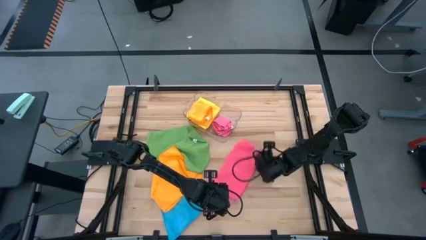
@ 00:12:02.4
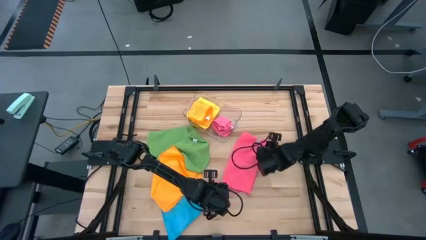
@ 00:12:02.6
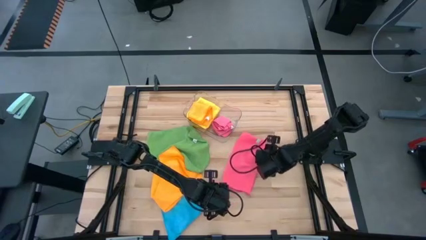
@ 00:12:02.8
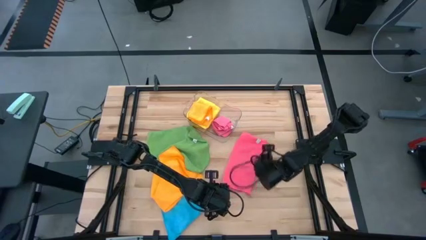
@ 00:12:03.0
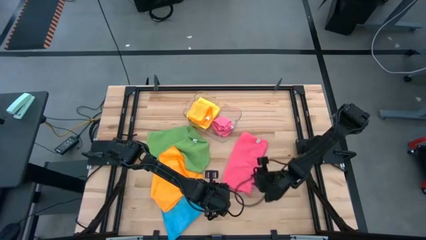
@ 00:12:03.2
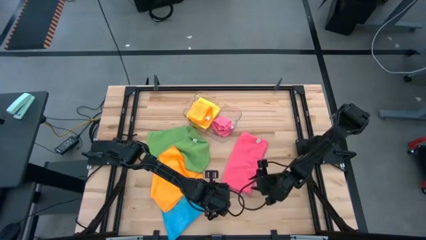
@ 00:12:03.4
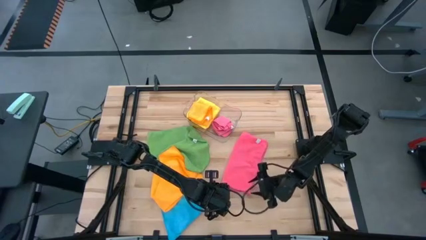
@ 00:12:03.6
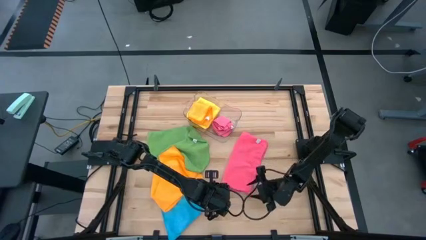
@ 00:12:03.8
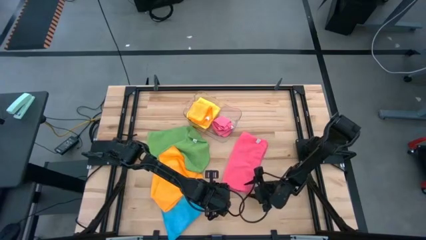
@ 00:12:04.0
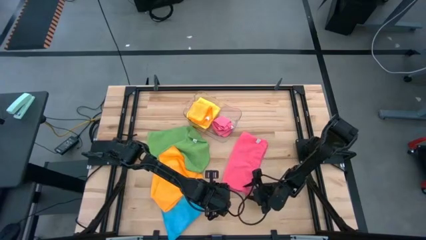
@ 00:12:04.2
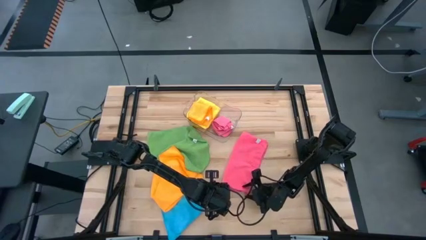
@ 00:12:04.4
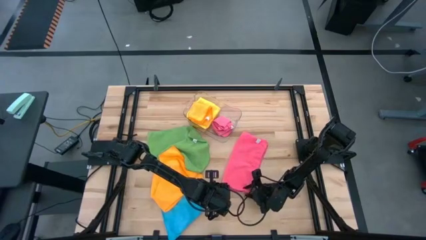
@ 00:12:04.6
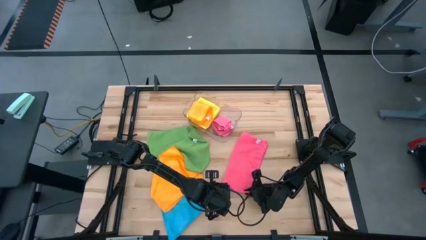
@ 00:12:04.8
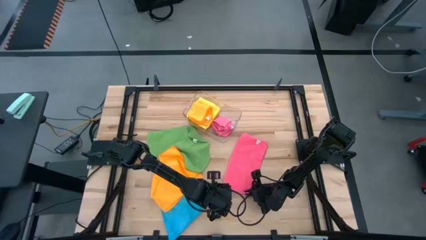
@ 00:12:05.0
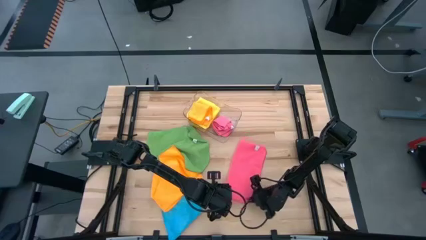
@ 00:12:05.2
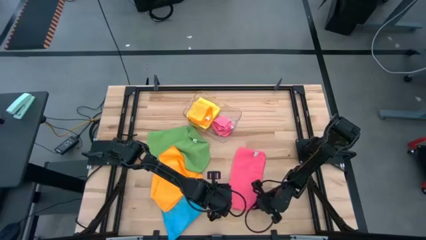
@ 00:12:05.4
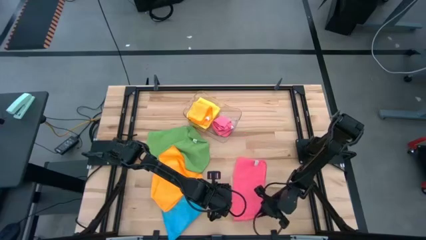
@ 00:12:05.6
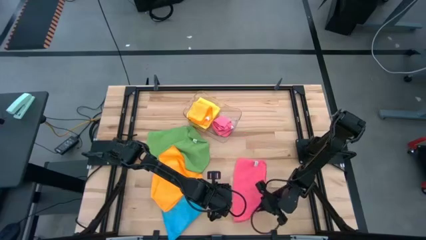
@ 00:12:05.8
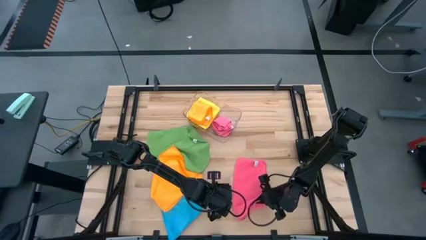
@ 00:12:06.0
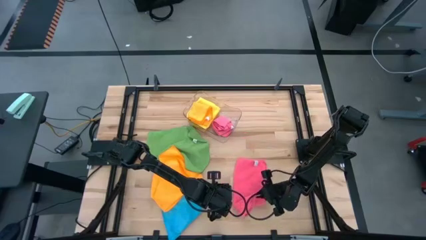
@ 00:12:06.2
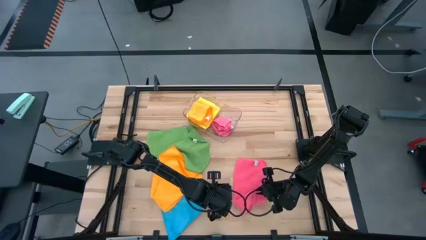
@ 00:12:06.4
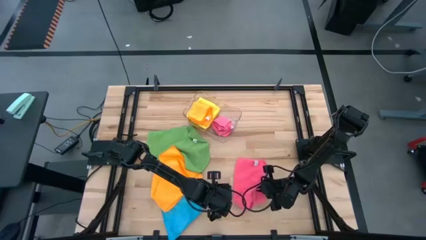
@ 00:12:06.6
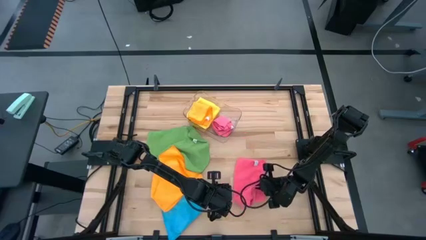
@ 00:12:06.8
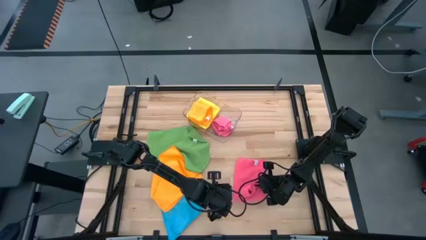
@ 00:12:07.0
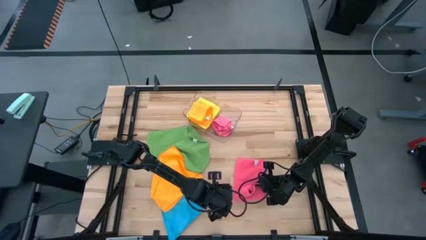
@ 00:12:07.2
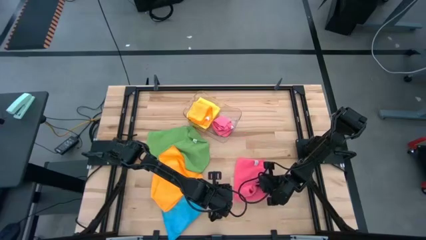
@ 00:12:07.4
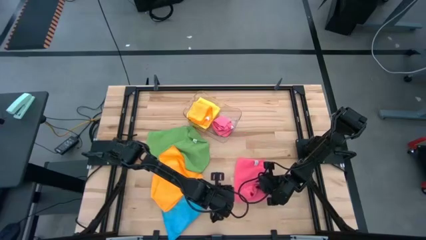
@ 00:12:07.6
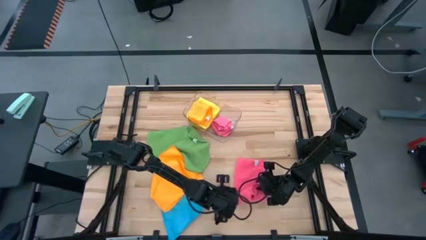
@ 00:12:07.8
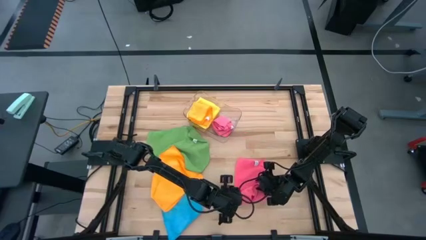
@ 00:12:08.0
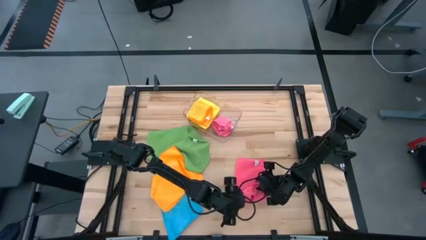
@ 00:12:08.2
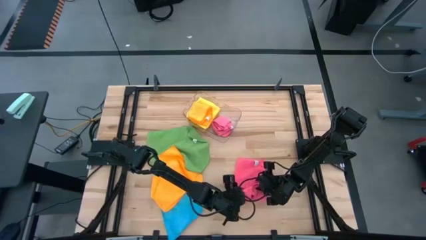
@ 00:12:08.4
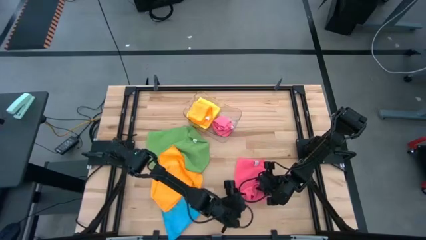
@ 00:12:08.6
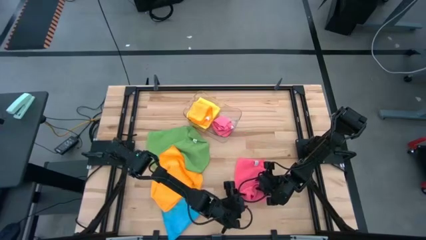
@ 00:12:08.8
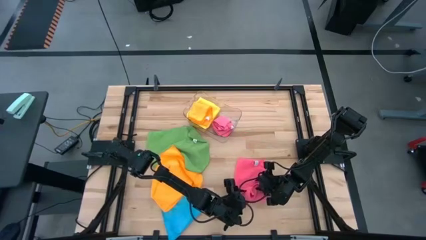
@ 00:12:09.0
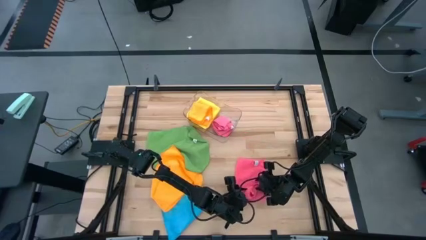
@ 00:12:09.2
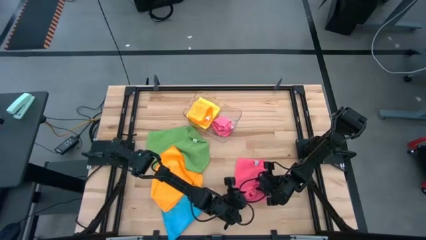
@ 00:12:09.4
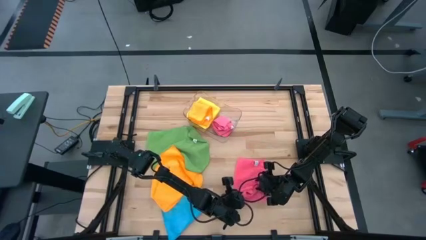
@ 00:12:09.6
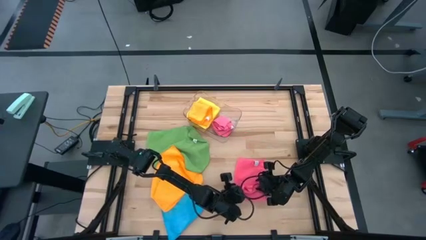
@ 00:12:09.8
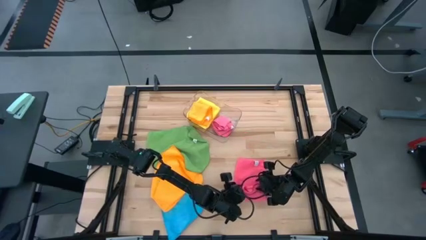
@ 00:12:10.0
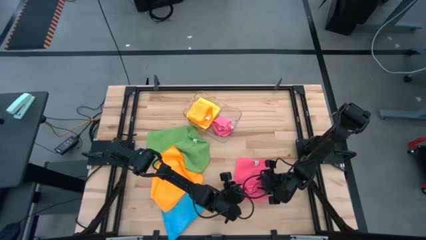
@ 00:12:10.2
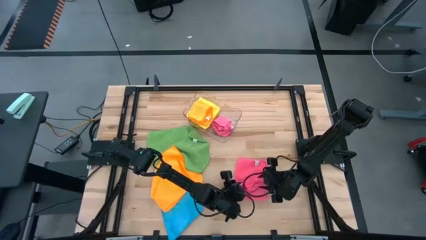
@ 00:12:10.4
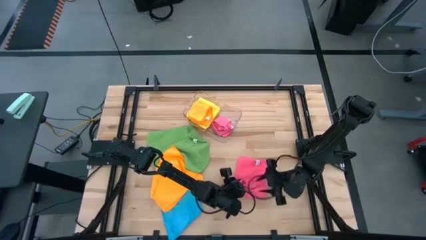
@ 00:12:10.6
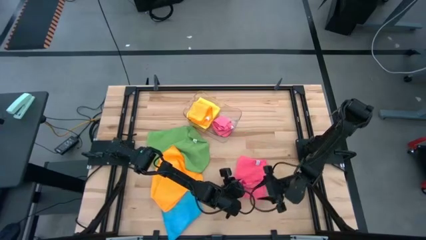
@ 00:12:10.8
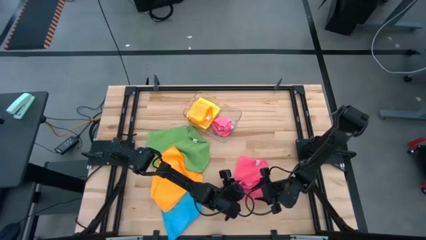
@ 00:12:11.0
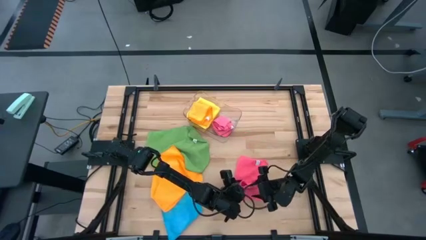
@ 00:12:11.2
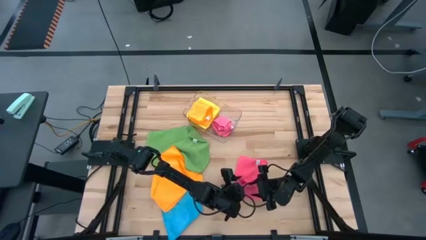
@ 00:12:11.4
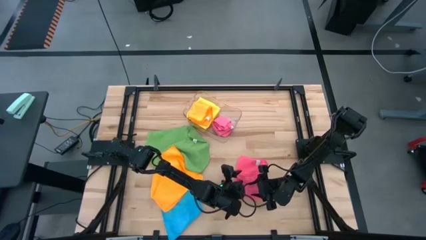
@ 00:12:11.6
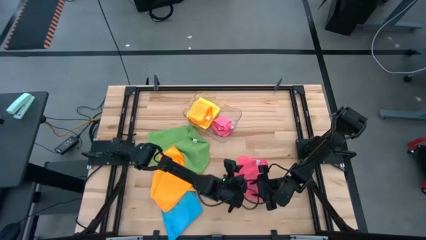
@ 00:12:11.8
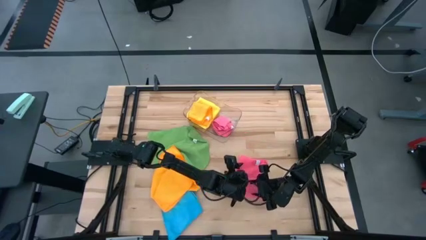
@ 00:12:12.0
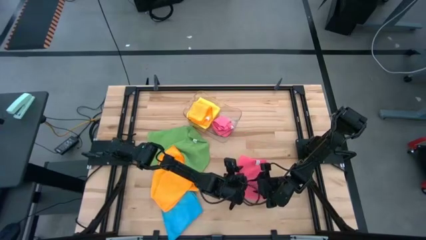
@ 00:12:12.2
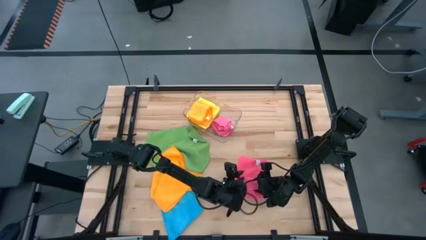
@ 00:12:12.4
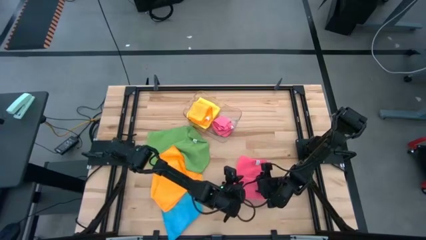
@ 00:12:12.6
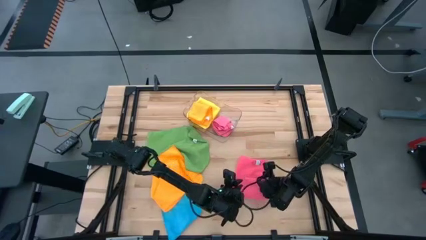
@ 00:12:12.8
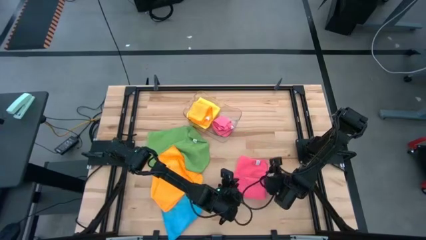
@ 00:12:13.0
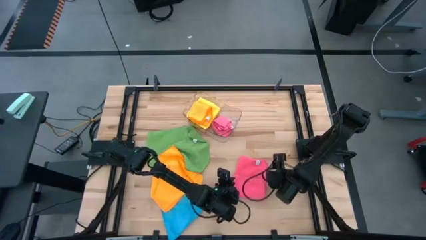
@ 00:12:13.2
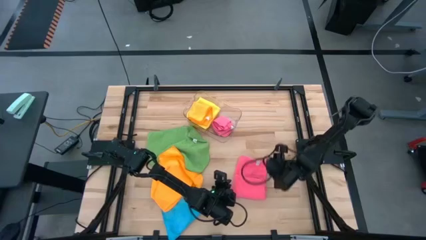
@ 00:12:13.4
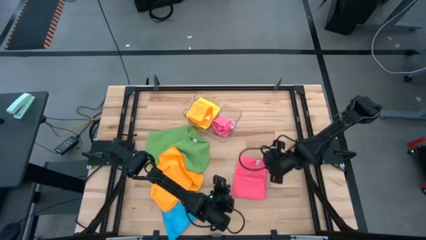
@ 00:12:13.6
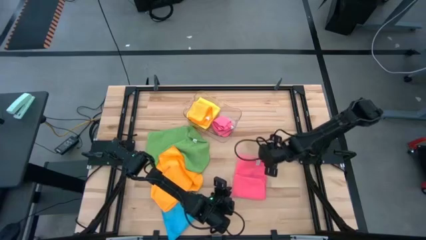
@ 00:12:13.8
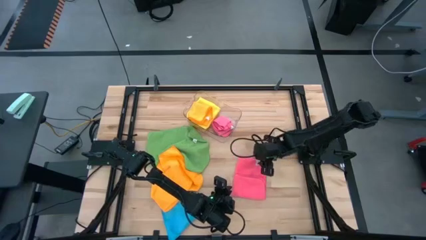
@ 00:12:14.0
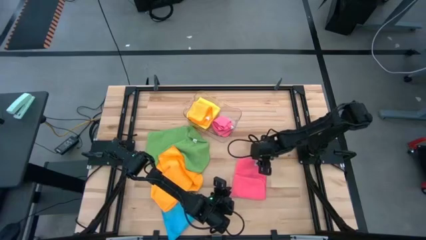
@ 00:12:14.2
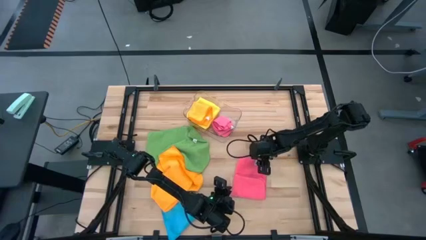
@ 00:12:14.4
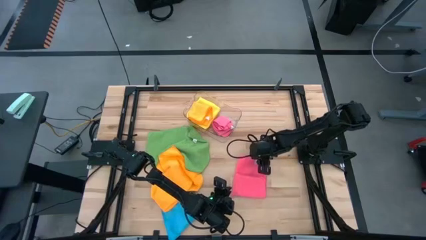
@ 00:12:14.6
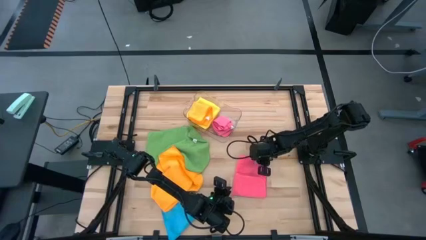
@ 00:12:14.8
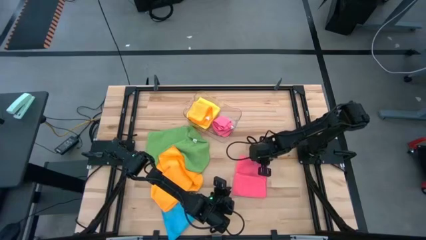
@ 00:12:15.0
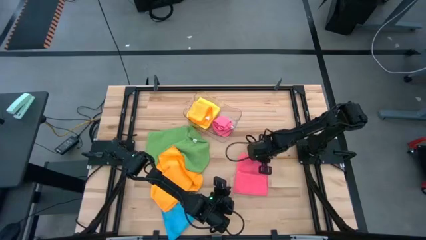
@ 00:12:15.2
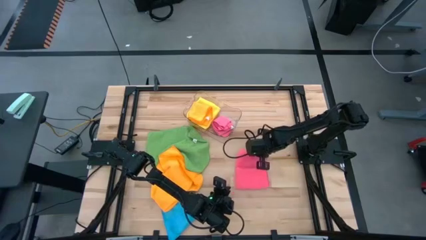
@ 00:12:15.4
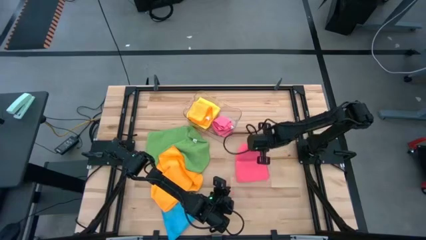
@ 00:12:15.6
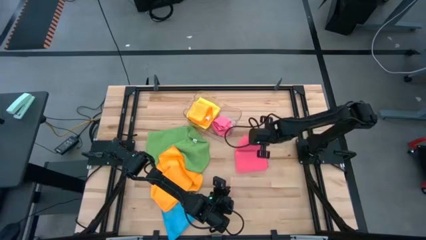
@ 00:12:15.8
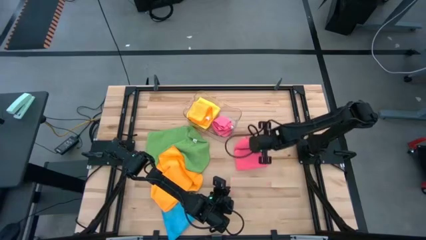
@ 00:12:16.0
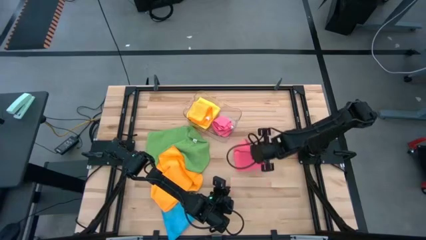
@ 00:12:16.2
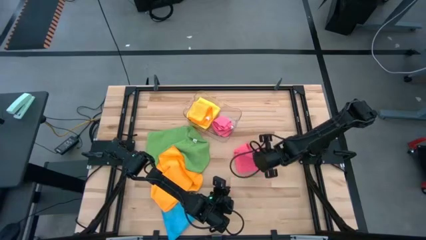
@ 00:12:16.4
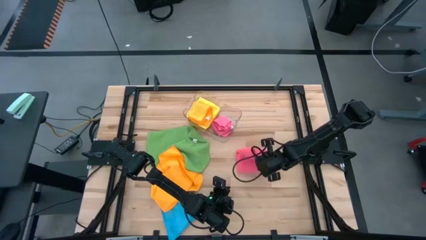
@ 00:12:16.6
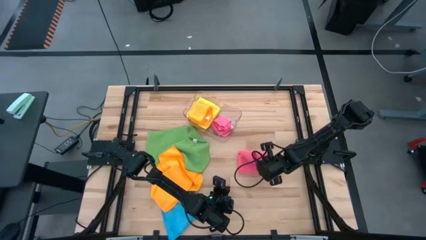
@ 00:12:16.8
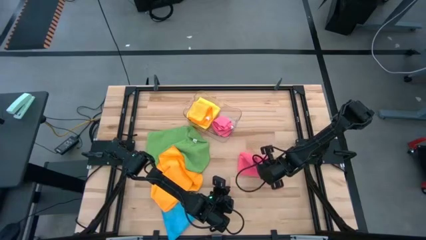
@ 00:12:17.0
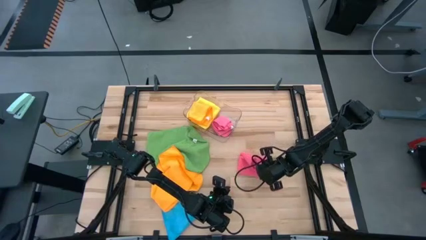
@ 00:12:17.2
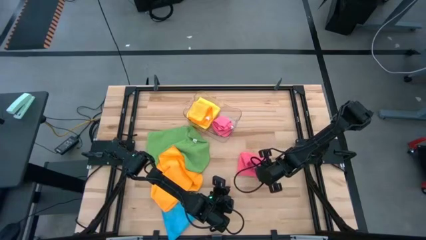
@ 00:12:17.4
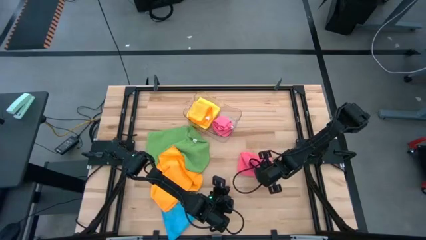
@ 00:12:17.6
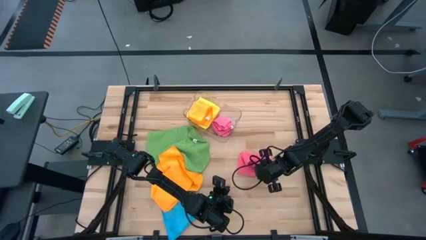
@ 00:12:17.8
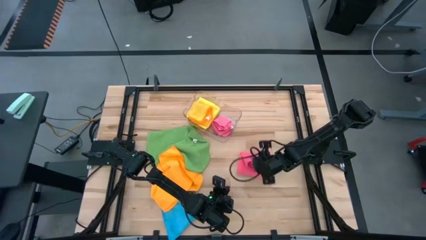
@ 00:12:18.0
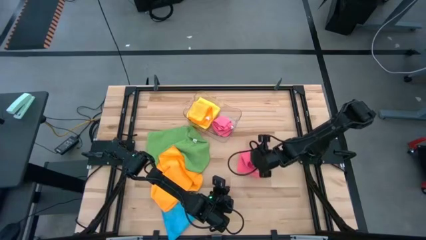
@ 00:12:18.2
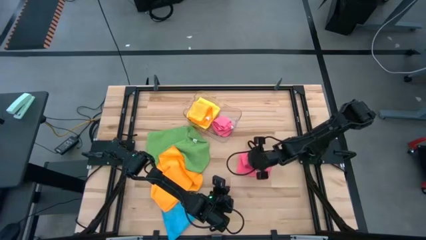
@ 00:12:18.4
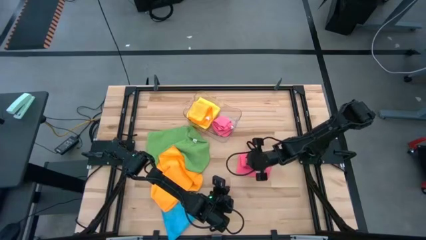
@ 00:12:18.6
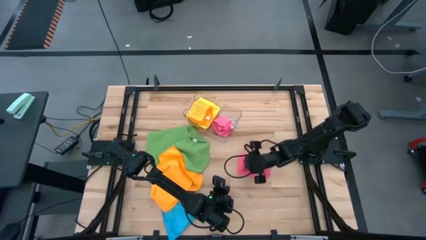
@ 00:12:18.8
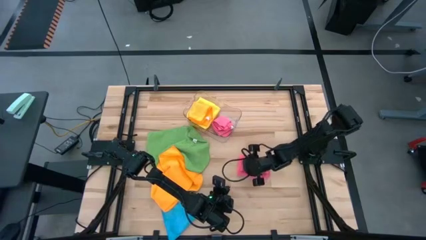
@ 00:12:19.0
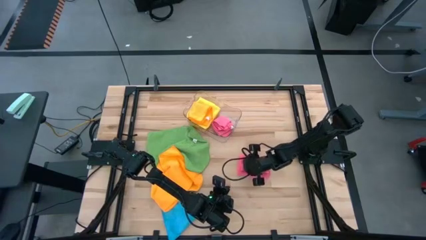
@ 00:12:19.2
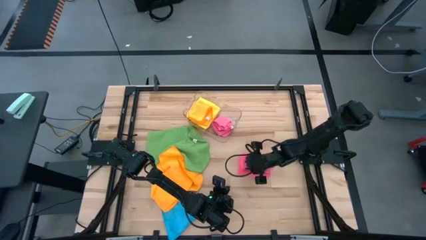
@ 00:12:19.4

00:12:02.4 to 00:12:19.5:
Task: Fold microfiber towels
Fold the pink microfiber cloth
